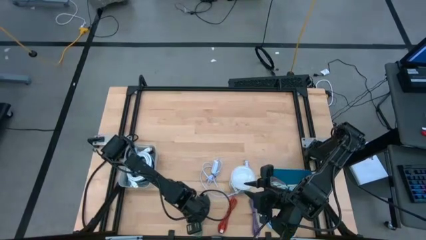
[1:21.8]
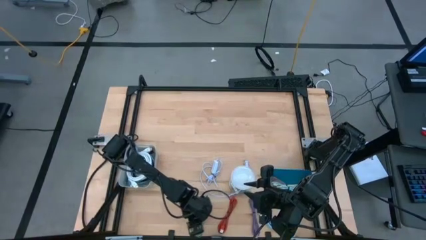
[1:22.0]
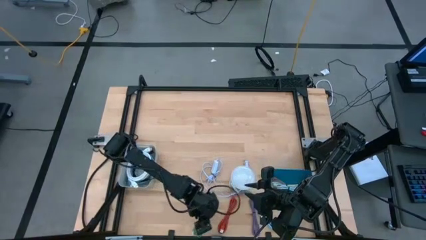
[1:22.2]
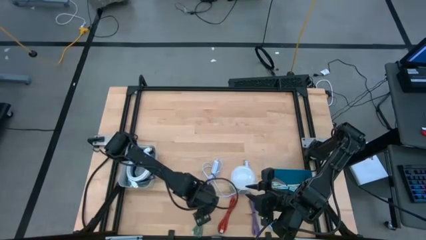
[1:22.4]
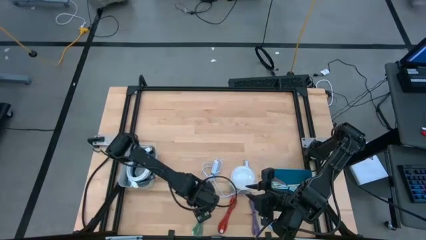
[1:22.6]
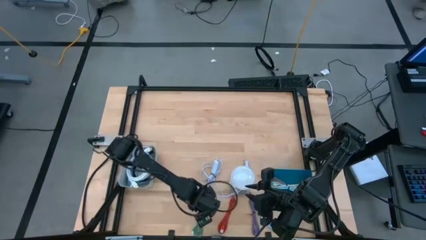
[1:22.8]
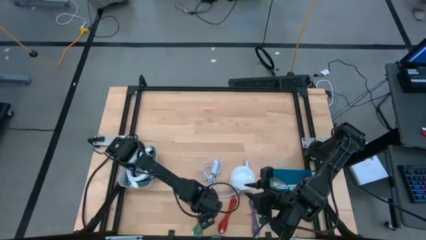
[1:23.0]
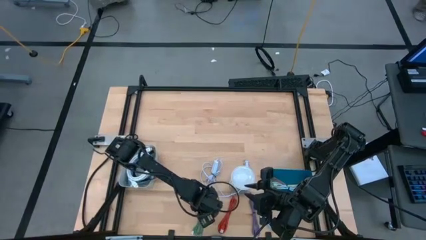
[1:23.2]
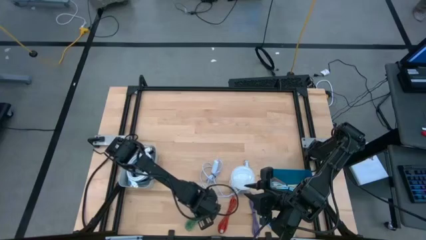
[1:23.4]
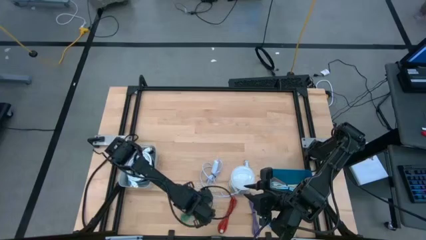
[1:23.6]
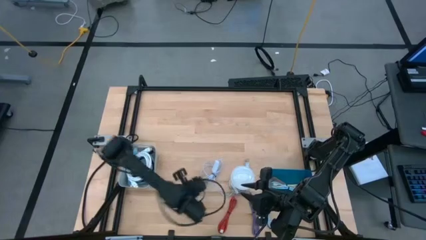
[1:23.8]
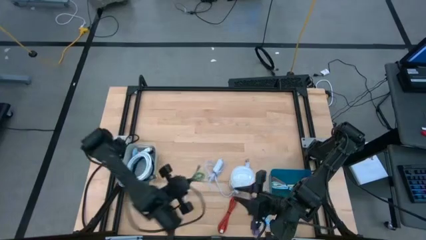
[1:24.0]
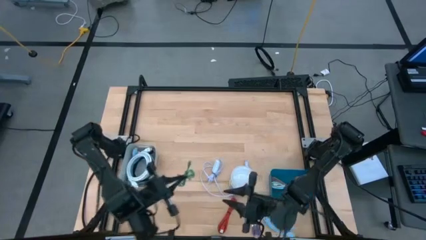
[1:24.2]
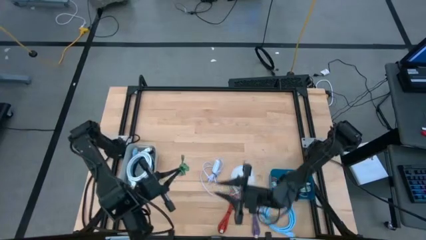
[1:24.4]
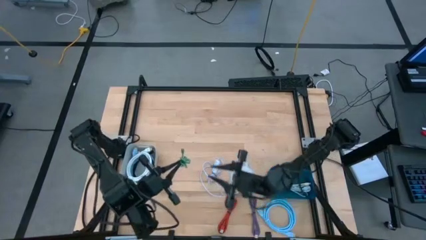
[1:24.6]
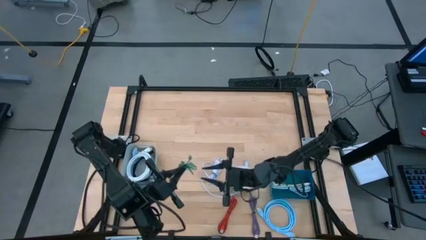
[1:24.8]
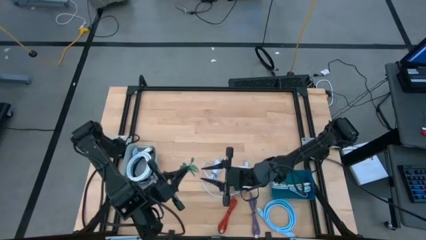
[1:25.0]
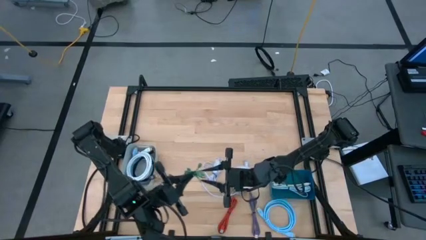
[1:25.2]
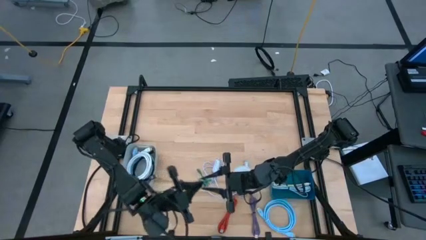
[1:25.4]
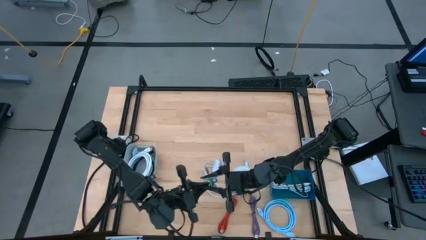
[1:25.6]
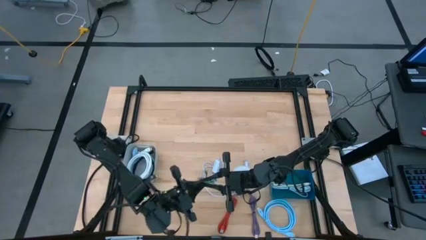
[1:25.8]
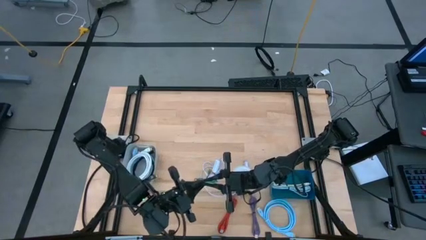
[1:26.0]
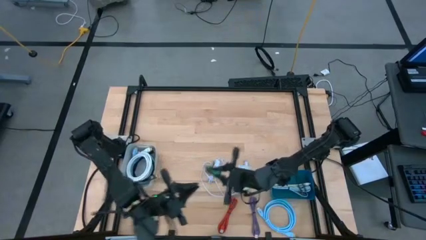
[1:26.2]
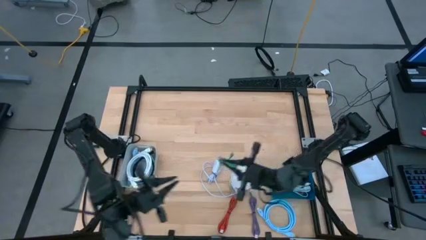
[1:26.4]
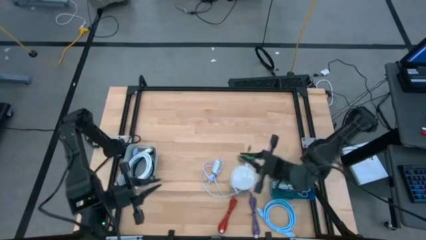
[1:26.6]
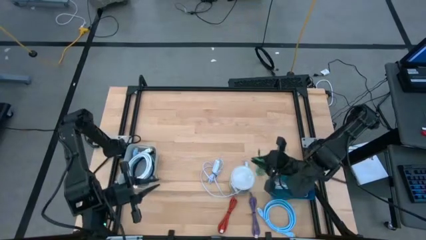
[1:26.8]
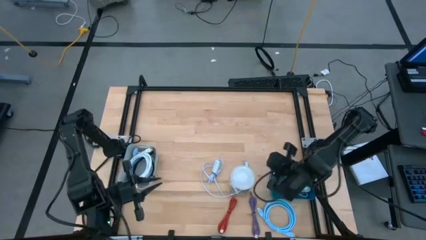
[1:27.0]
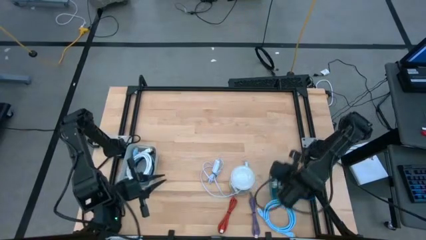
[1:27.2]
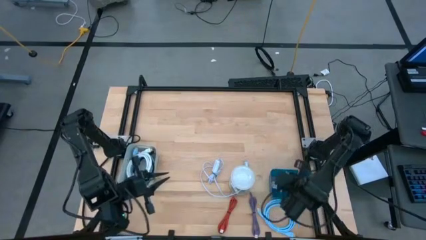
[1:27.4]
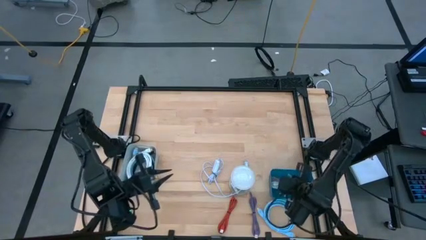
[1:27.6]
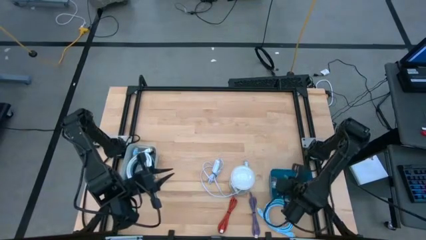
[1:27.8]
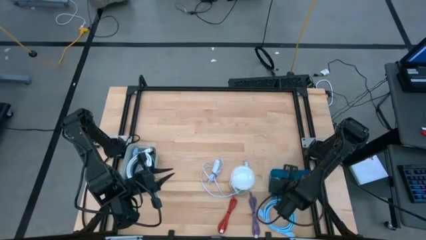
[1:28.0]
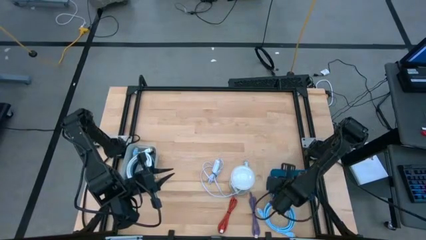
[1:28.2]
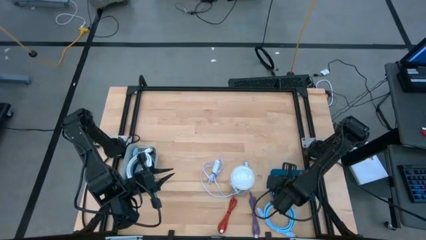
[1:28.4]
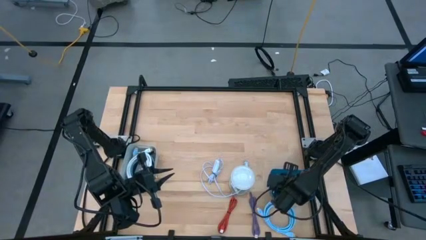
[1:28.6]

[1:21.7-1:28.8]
Task: Pick & Place USB Port
Put the green USB cable into the blue bin

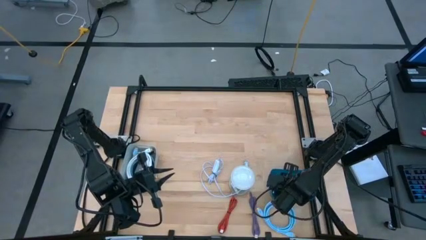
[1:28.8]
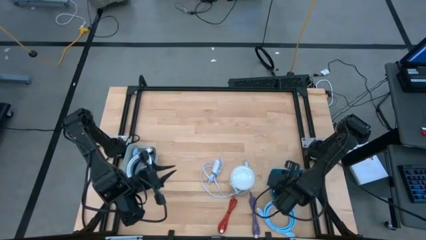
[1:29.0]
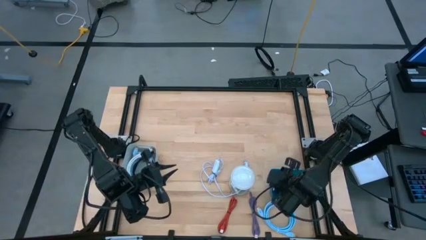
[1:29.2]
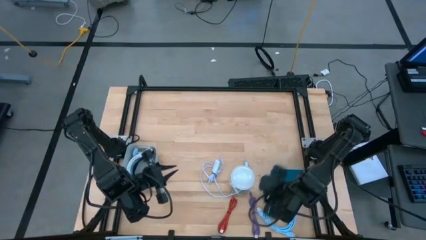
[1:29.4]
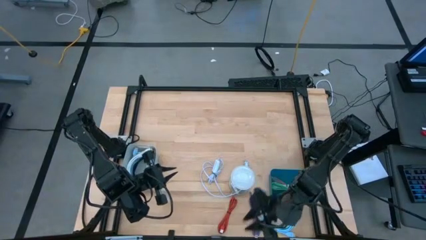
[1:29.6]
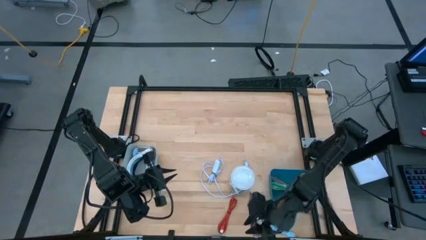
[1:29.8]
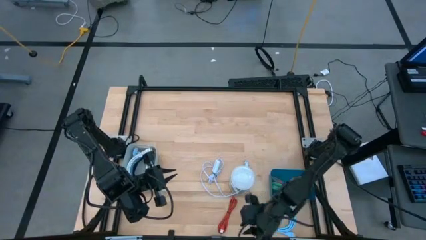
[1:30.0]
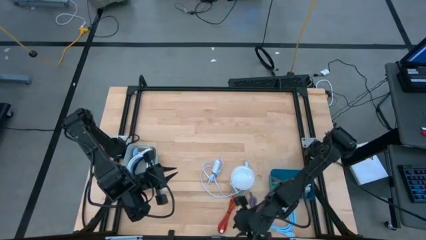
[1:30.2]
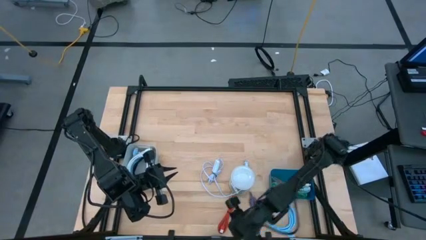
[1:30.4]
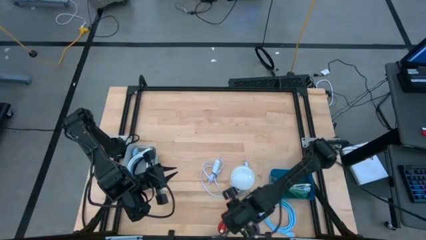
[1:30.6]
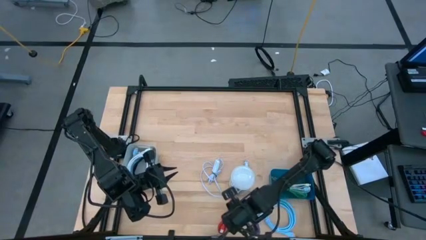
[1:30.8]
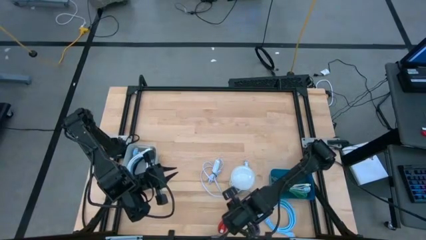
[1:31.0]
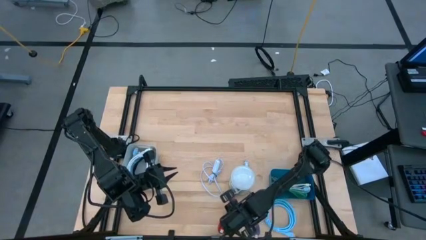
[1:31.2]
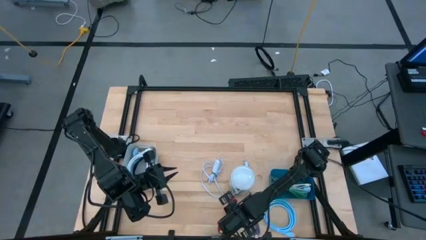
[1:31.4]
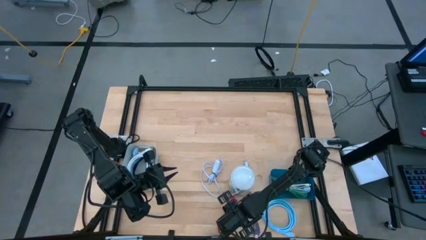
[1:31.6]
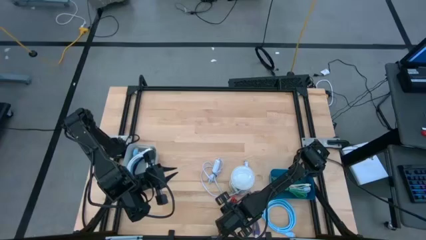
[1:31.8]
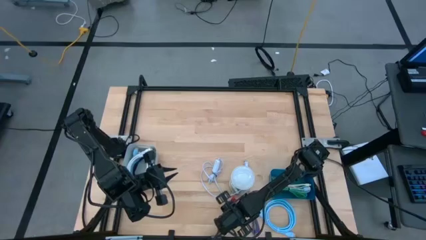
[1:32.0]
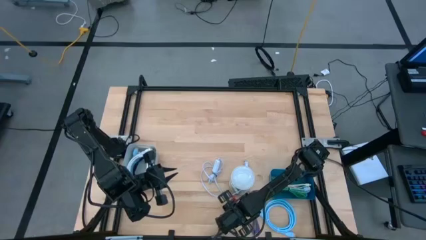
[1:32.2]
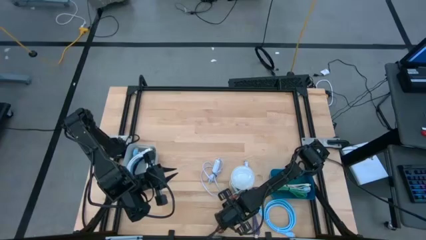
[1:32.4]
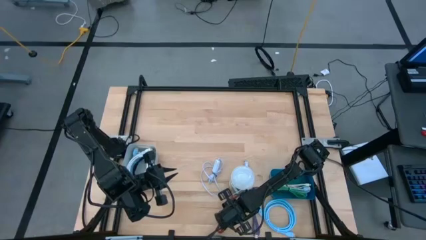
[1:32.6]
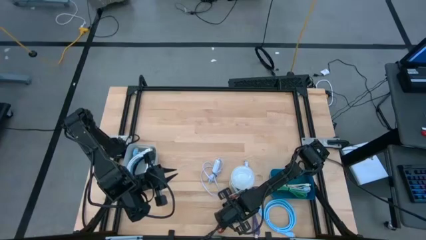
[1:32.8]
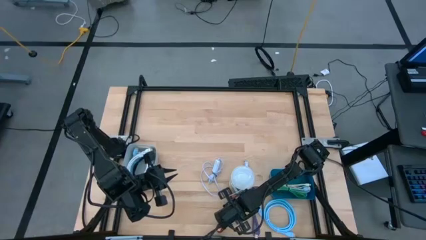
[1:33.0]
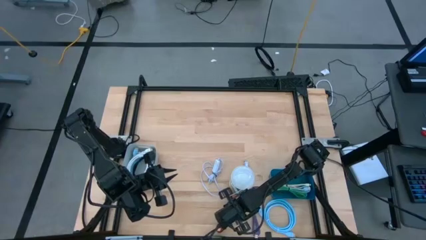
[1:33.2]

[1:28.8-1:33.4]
Put the orange USB cable into the blue bin

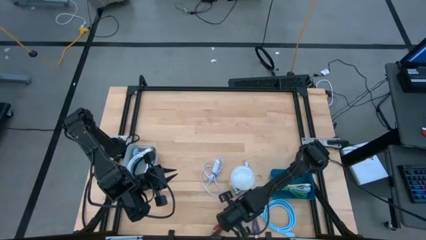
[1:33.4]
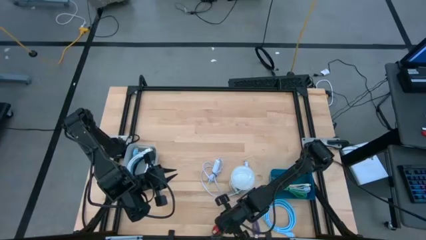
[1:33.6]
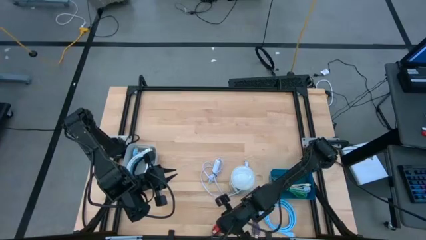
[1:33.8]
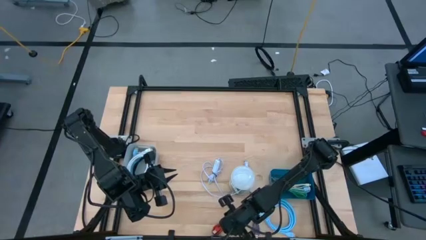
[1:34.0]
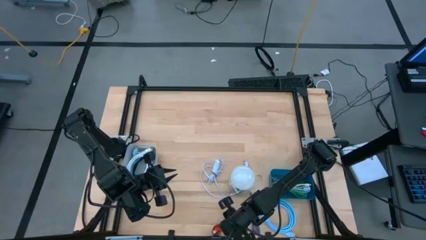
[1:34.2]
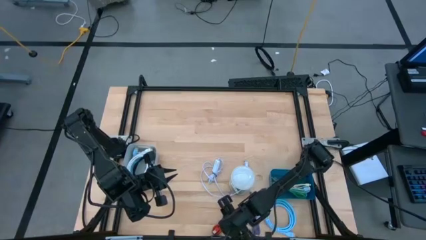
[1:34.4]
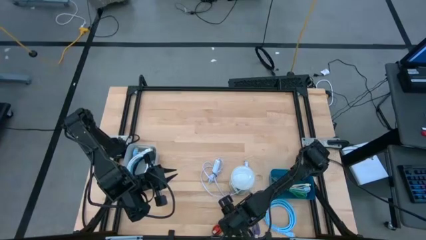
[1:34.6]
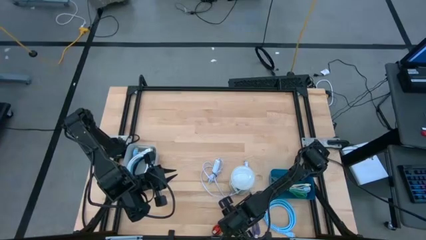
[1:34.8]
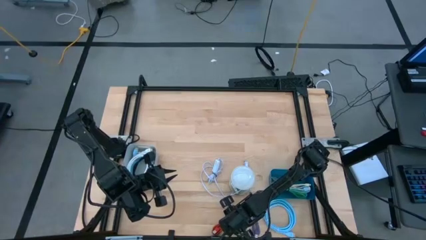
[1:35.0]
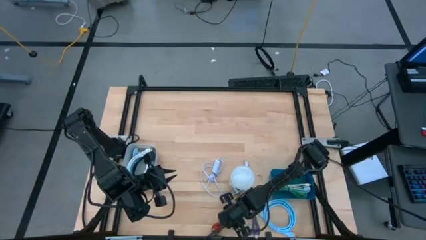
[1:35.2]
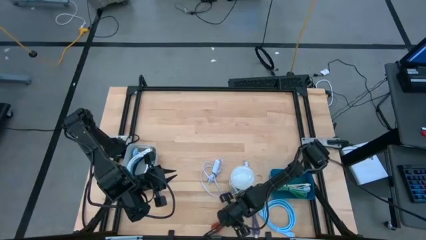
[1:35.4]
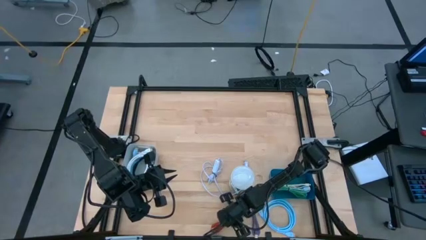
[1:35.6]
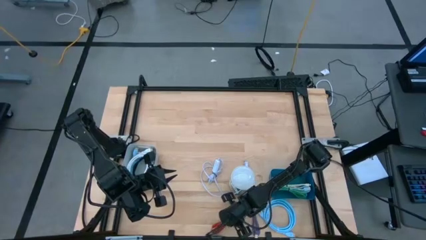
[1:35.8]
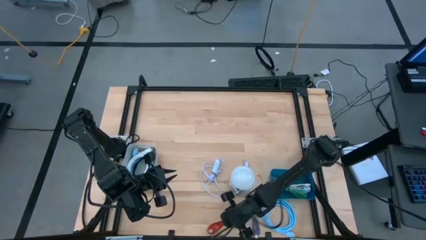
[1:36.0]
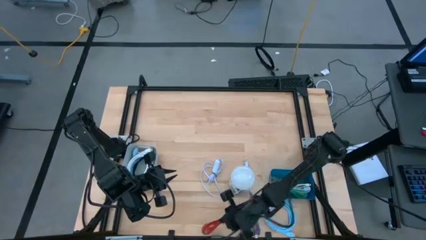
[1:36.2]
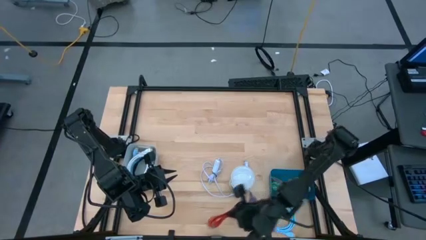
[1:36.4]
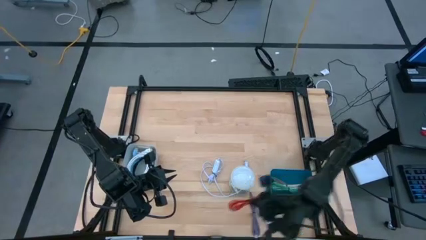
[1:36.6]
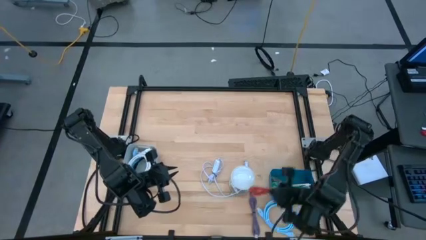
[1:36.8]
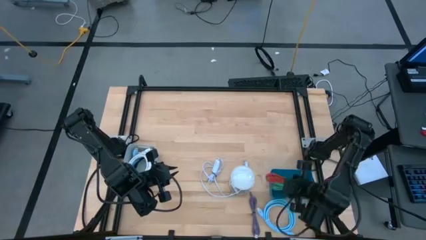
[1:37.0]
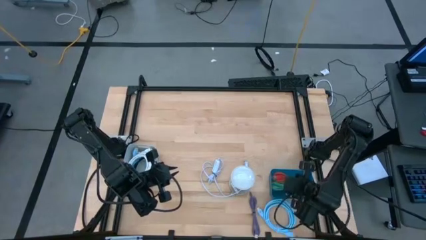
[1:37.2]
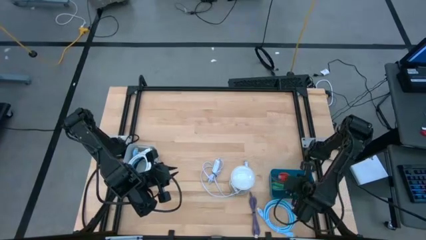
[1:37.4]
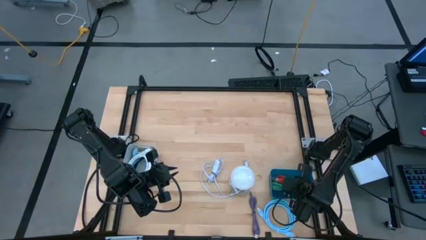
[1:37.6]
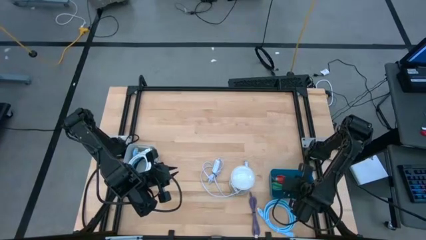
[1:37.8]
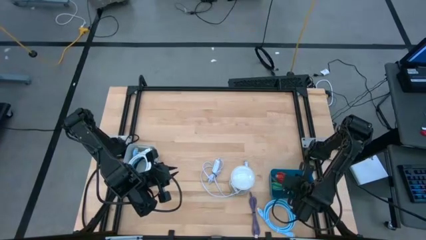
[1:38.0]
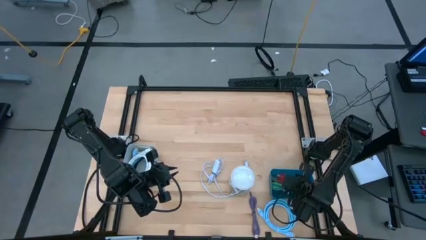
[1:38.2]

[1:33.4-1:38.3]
Put the orange USB cable into the blue bin
